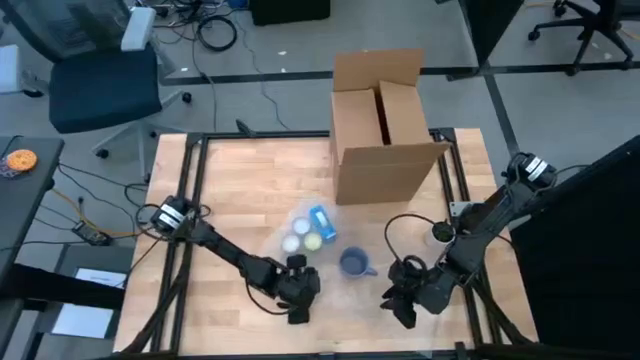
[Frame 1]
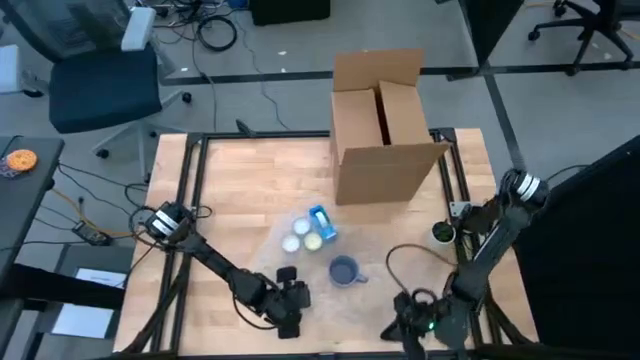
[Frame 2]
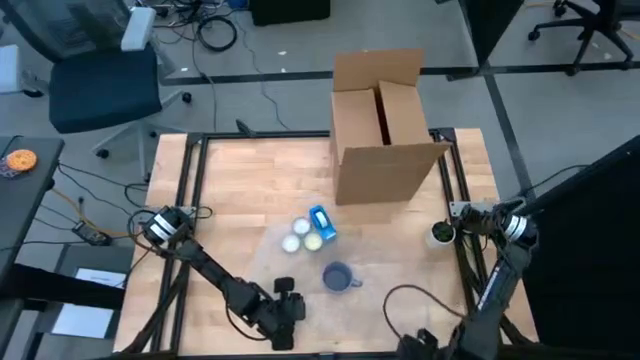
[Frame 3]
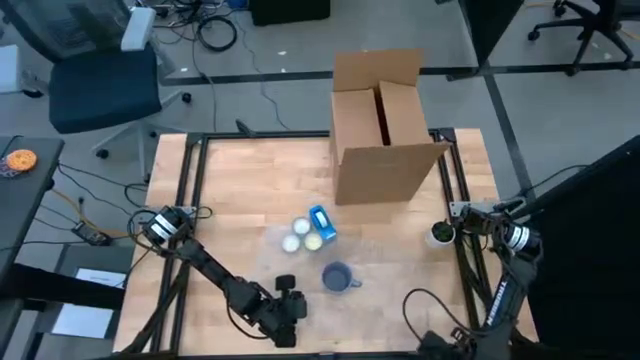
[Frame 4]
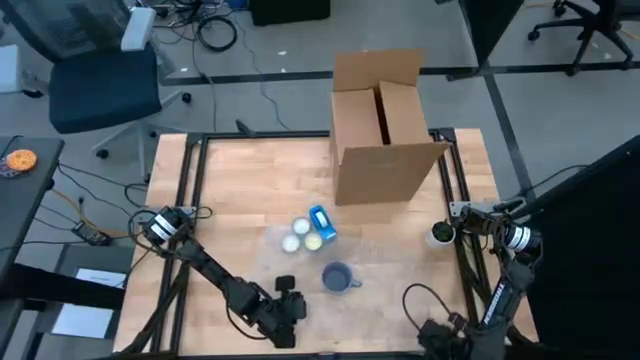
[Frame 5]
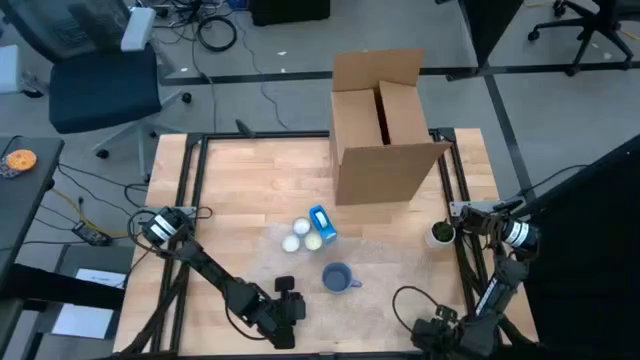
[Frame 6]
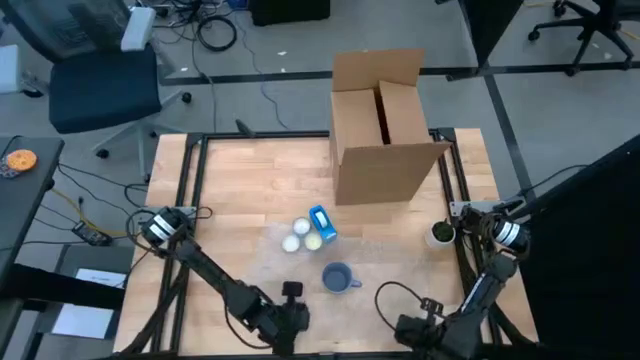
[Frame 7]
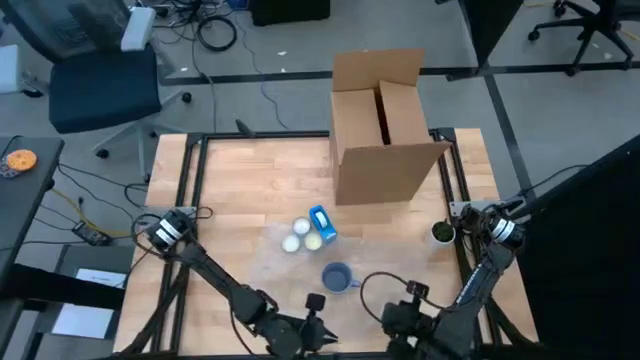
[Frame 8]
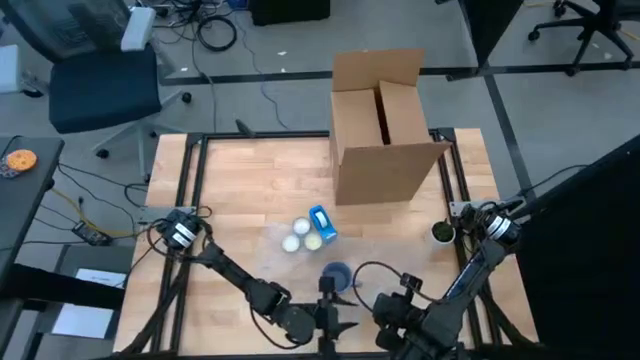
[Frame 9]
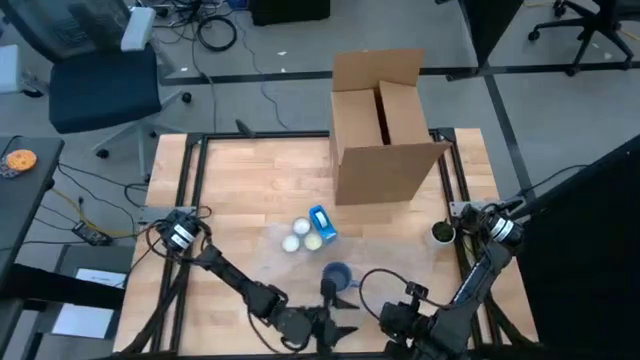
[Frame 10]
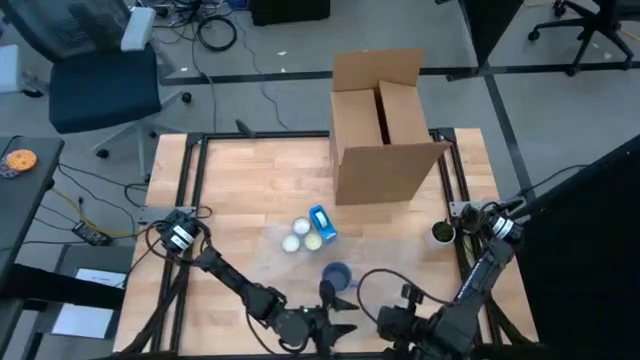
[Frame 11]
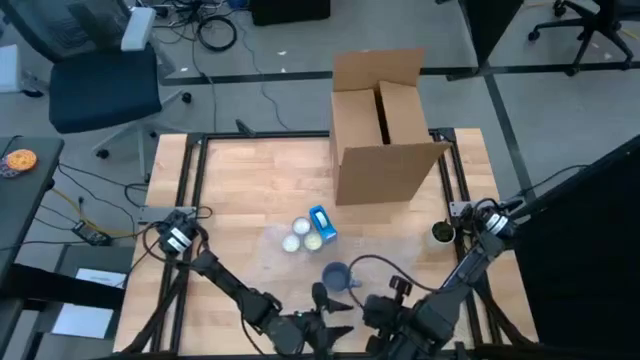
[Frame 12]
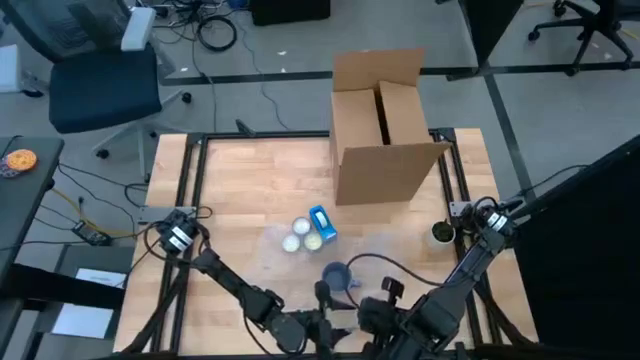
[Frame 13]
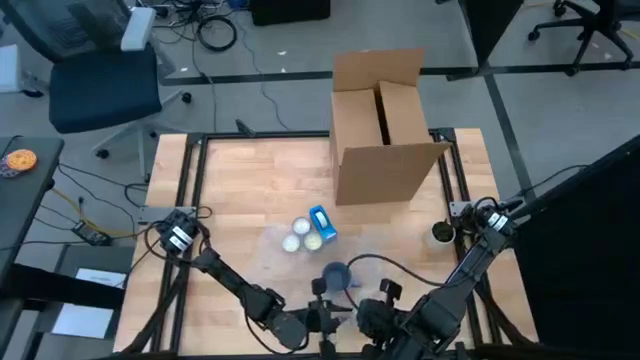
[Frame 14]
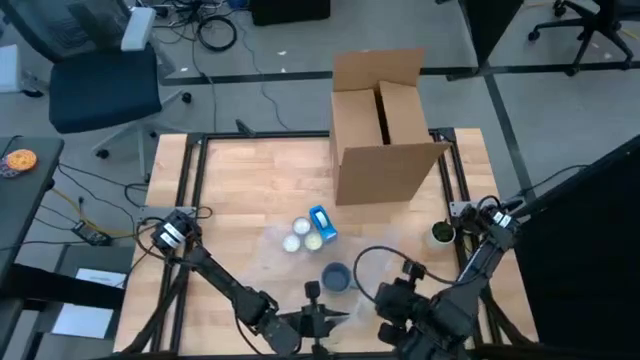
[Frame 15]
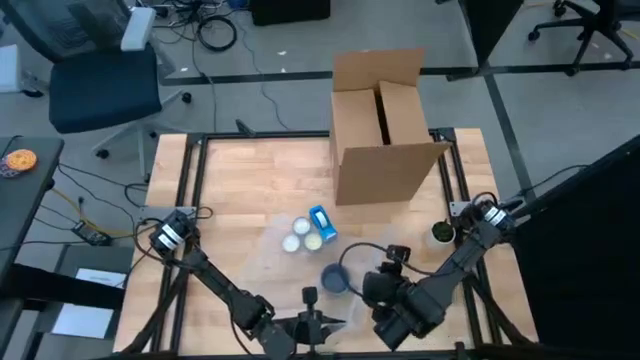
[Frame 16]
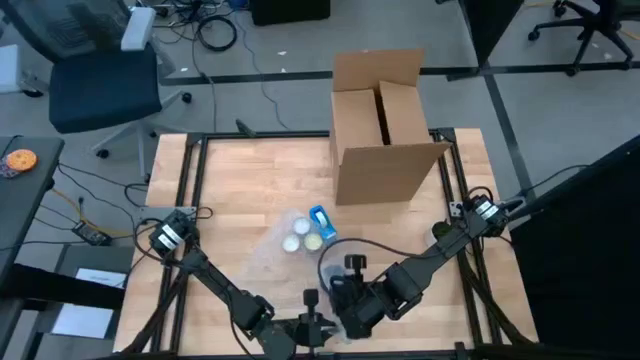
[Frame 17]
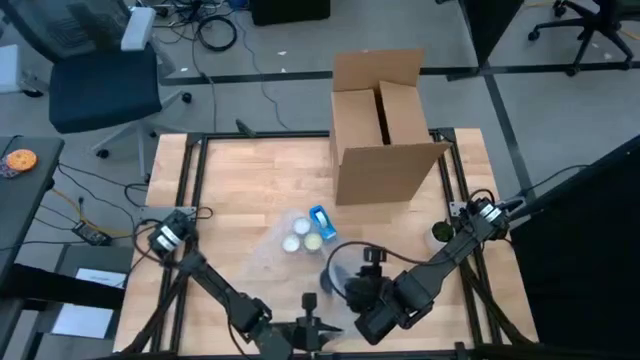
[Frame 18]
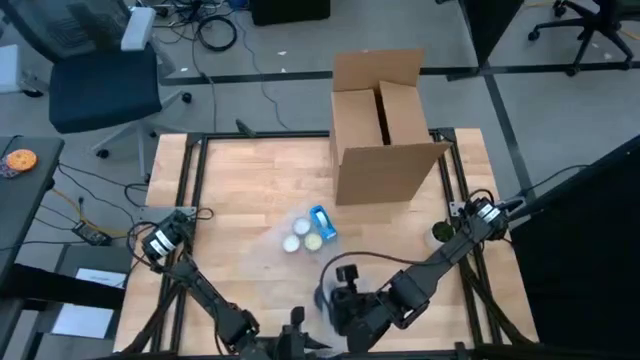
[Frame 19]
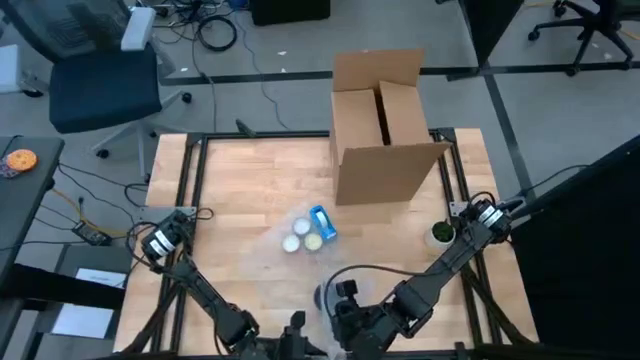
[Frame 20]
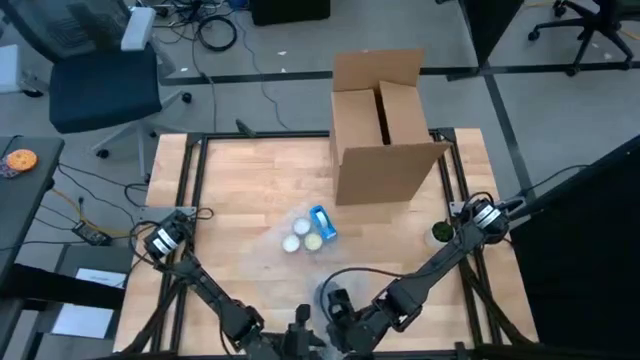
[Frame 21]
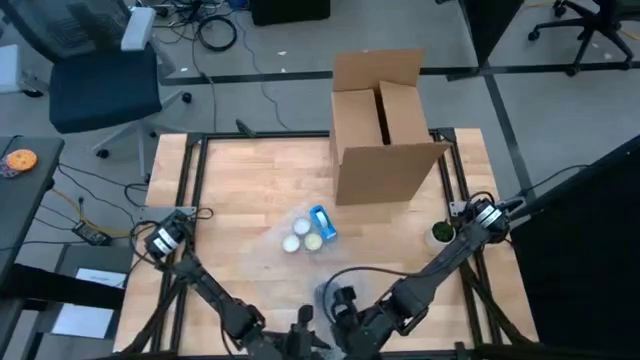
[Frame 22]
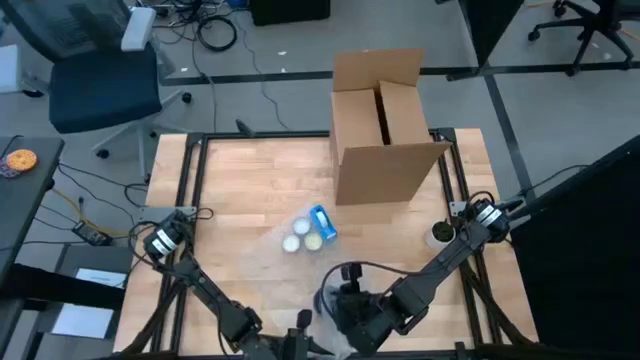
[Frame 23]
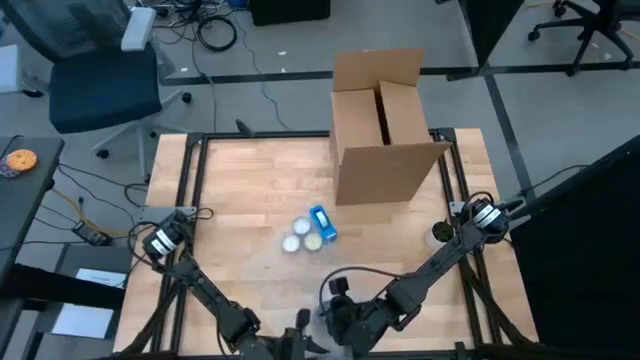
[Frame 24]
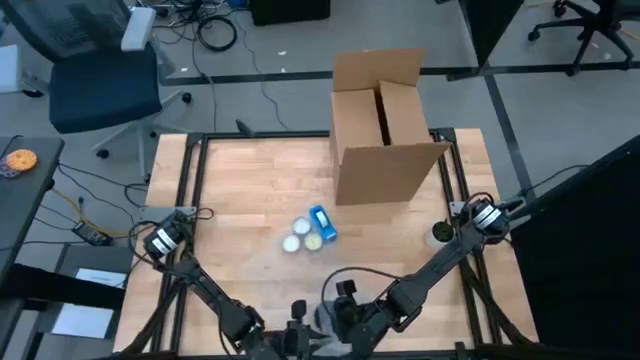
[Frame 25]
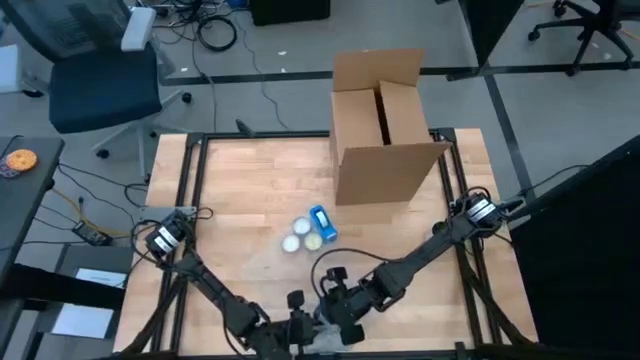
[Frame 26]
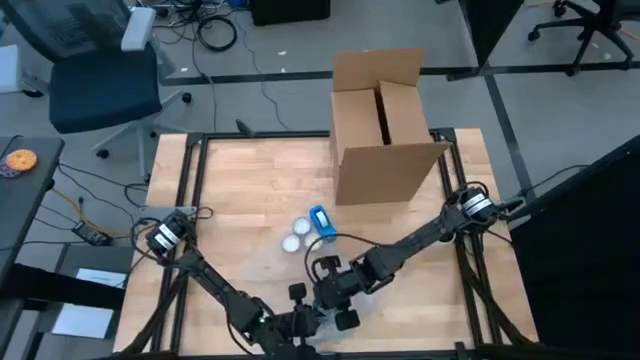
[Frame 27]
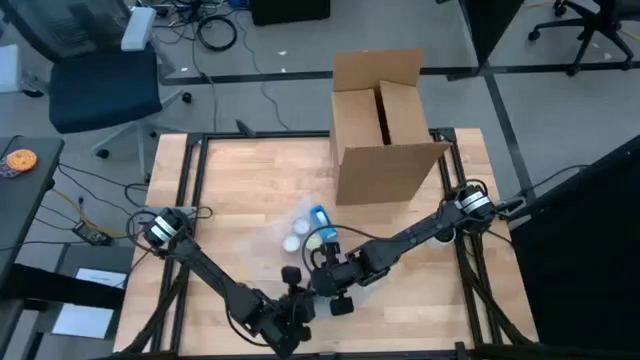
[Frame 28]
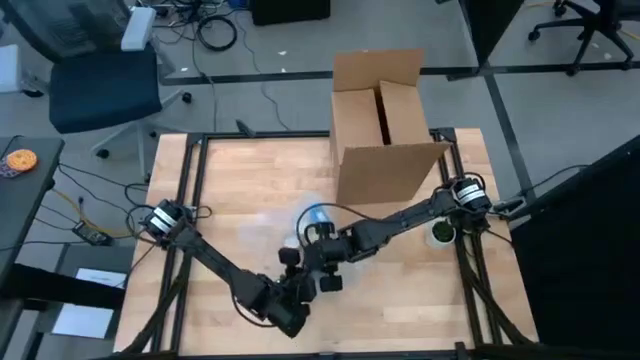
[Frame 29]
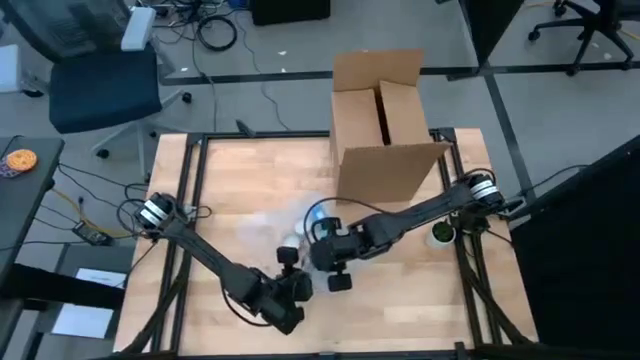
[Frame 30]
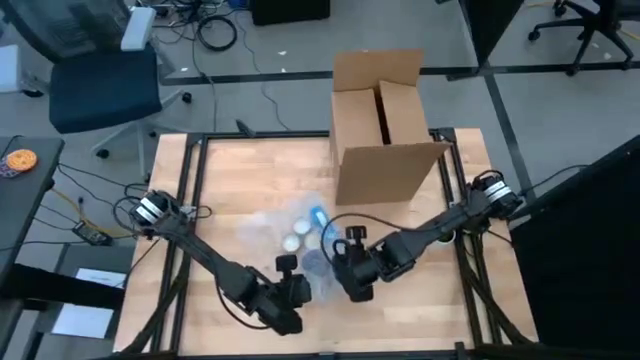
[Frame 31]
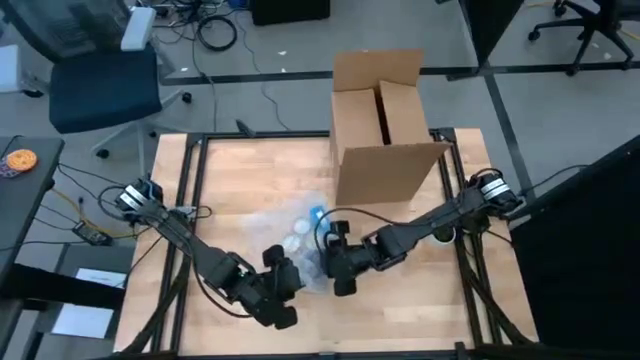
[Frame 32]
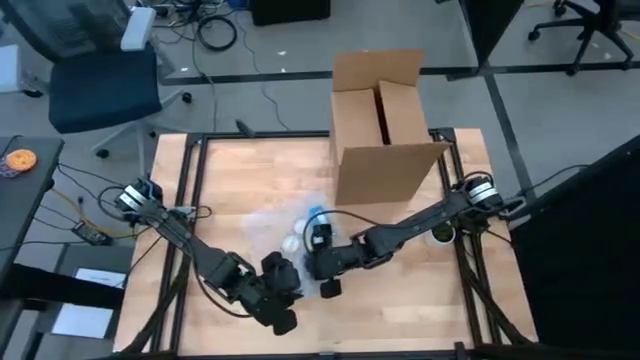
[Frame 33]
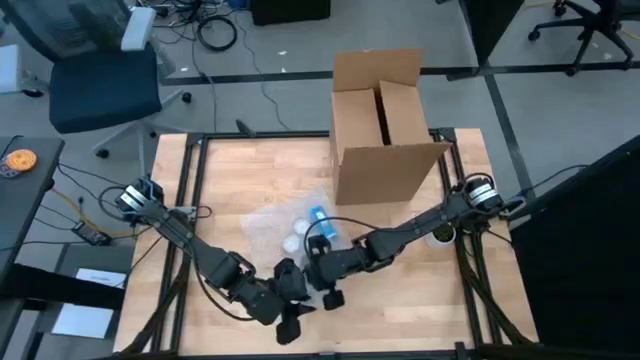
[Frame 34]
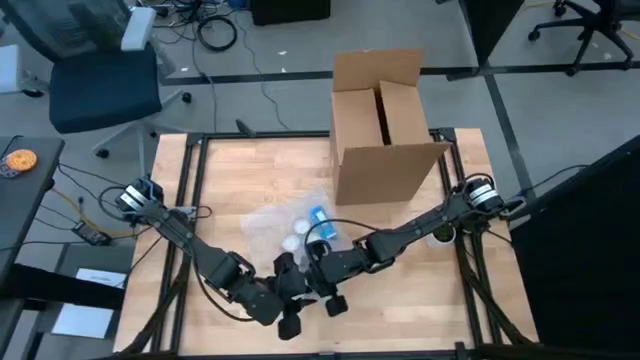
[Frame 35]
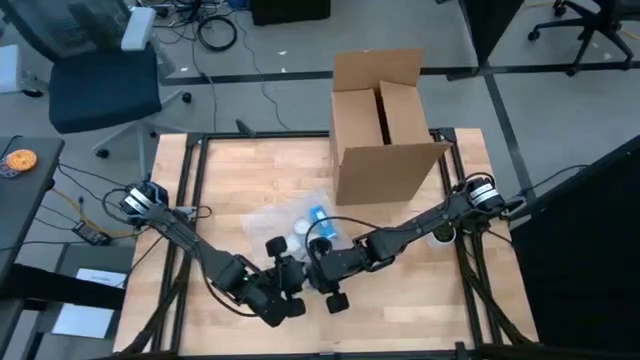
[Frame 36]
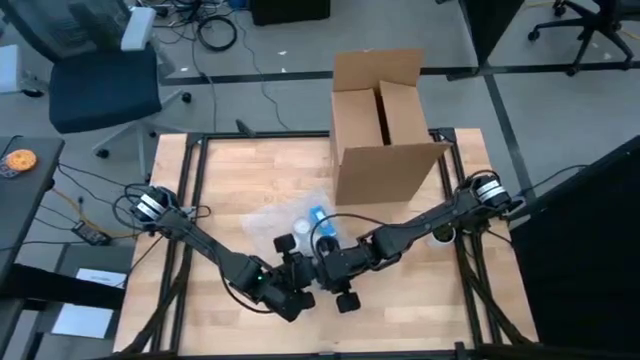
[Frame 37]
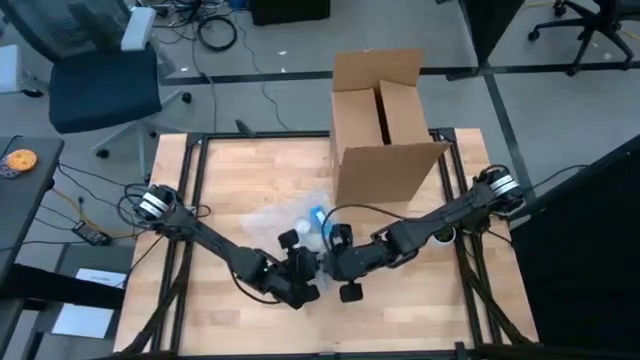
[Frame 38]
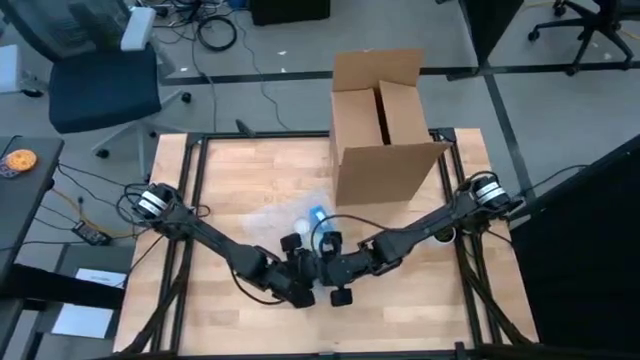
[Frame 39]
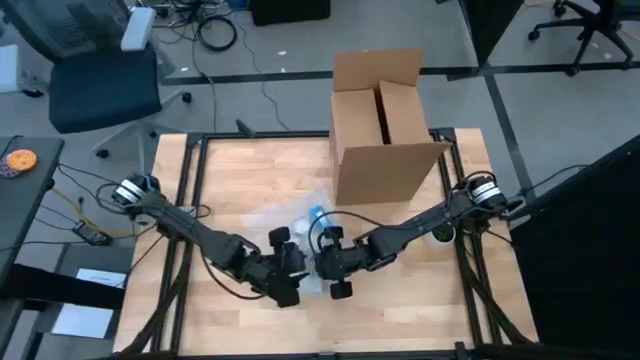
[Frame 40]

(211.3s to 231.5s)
Task: wrap mug
Wrap the purple mug with the transparent bubble wrap
